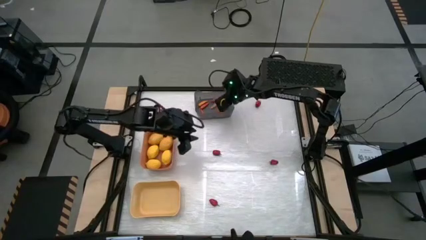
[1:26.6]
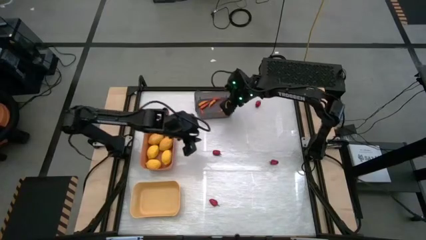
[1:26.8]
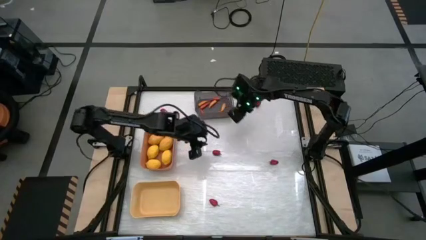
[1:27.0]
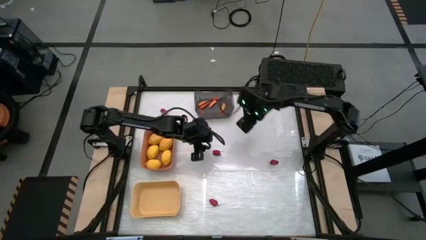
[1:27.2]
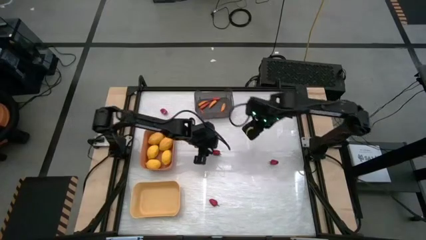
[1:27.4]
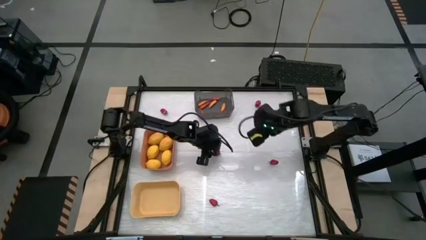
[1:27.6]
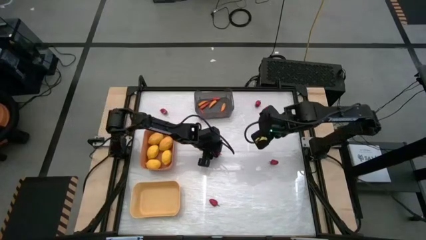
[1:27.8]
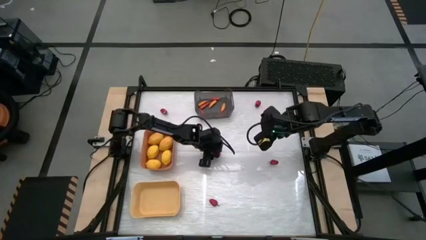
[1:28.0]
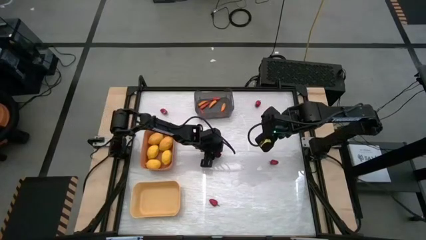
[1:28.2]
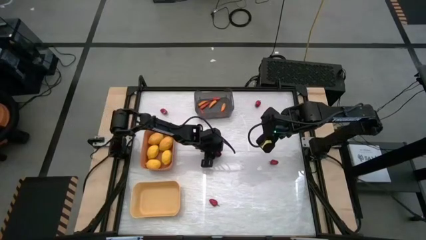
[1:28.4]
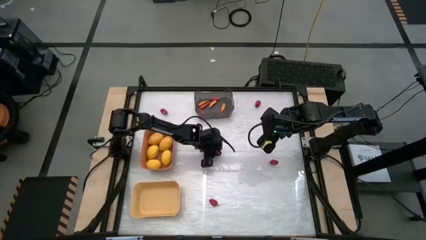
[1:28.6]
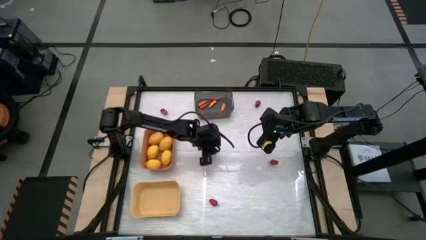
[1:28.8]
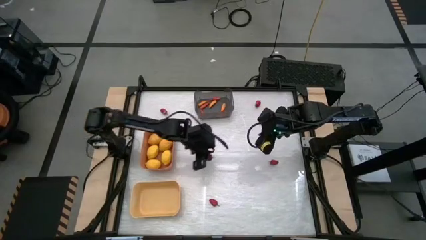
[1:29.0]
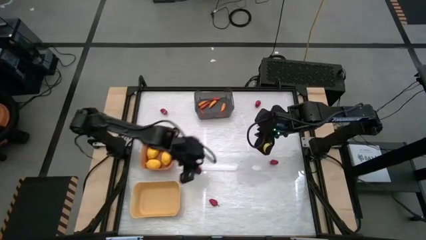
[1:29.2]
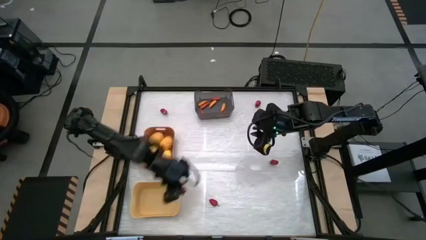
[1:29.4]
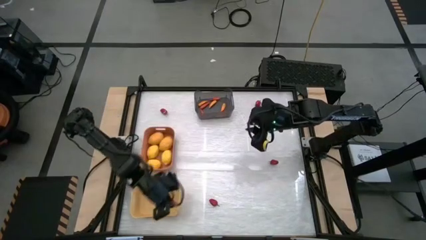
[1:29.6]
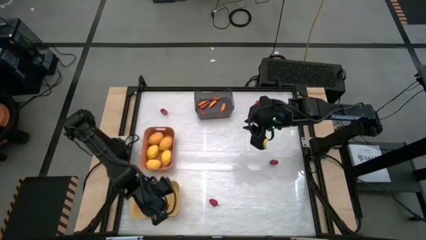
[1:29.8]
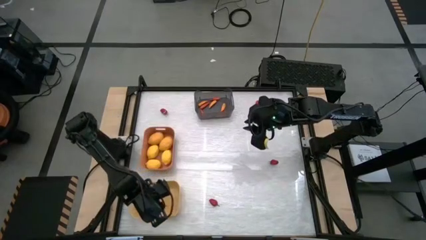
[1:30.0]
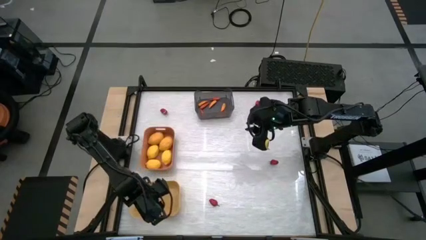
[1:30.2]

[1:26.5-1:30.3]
Task: Sort produce into baskets
Put the red bell pepper into the yellow bin

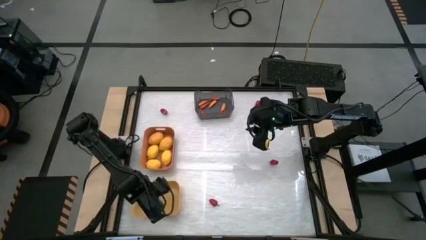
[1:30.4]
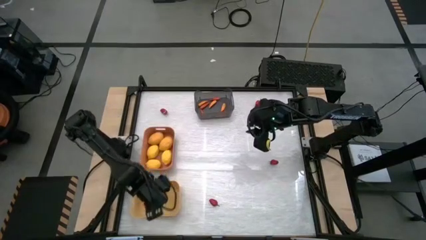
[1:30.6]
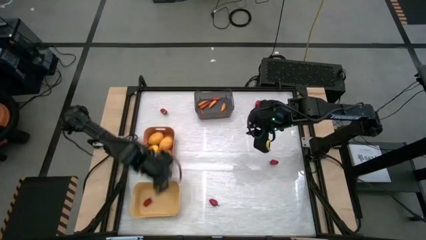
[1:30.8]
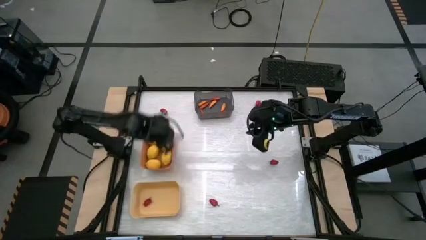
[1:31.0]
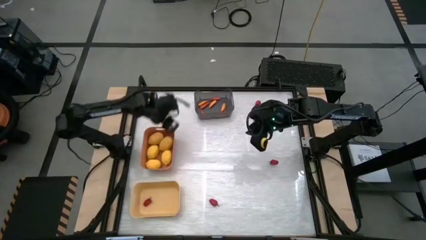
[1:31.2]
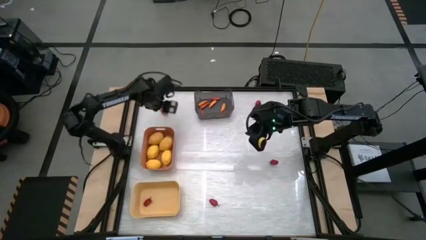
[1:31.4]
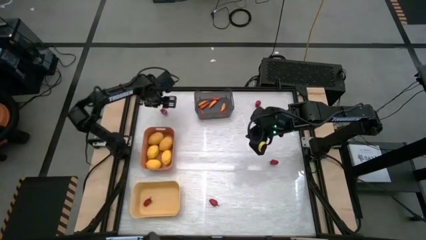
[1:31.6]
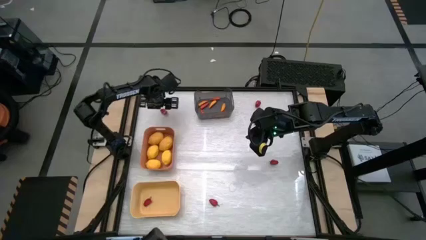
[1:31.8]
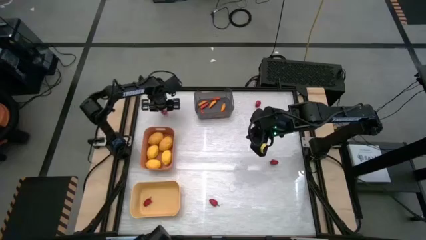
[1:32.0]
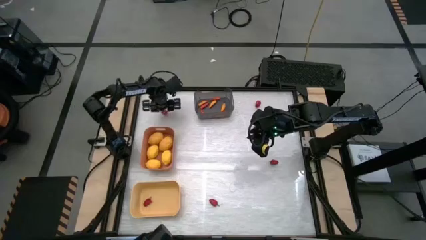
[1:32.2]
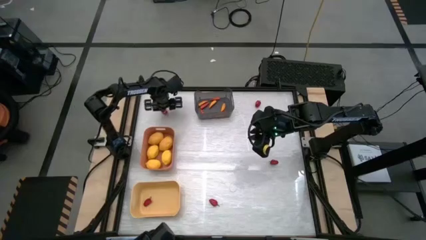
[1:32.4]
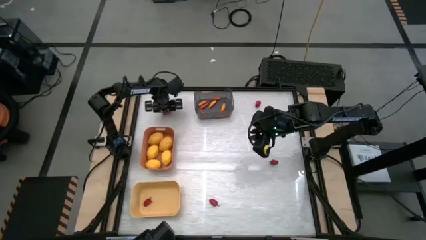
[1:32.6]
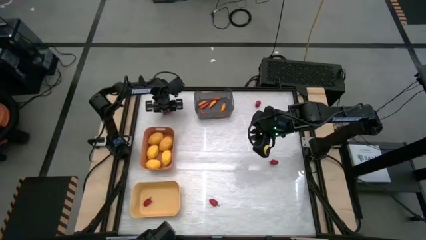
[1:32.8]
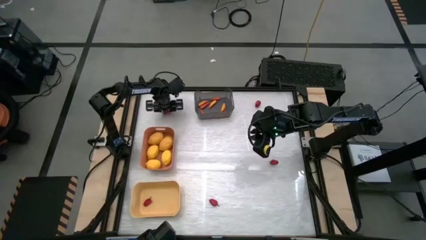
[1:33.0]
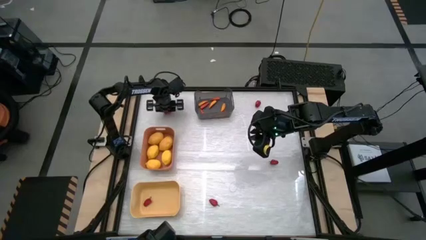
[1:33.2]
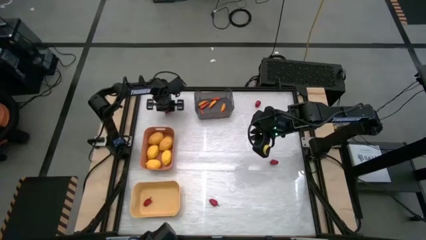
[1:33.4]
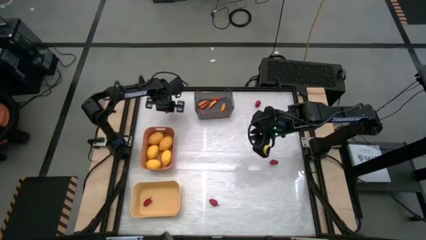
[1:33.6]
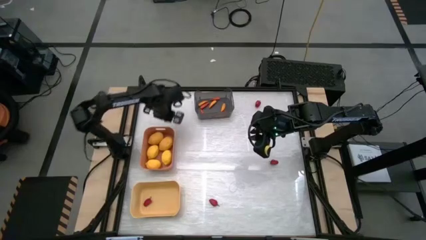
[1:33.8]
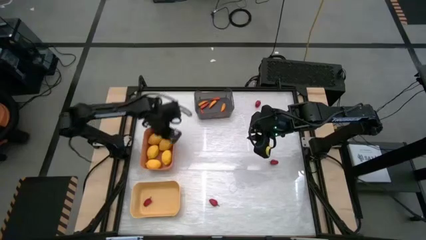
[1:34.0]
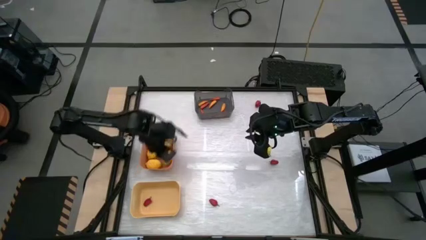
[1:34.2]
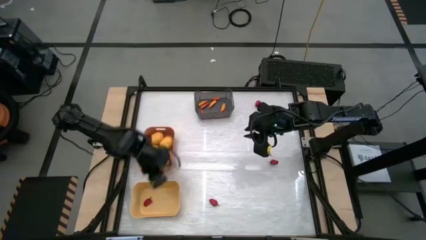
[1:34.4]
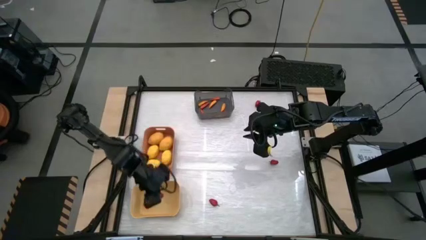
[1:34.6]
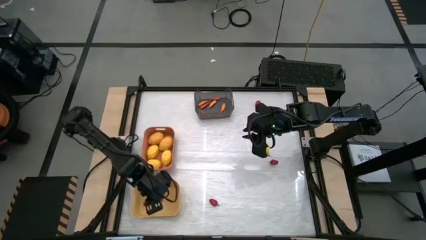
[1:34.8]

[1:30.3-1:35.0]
Put the red bell pepper into the yellow bin

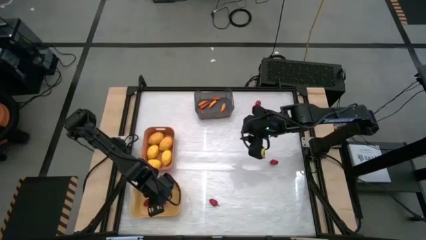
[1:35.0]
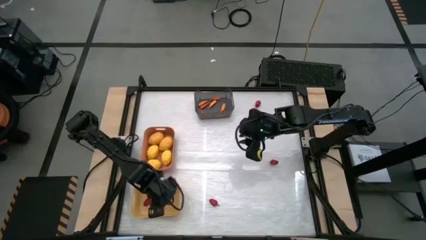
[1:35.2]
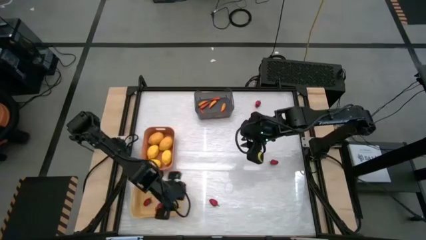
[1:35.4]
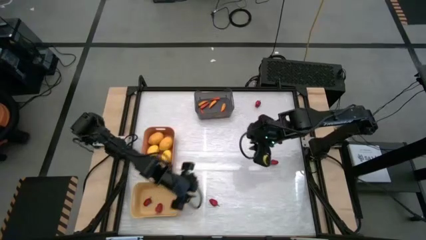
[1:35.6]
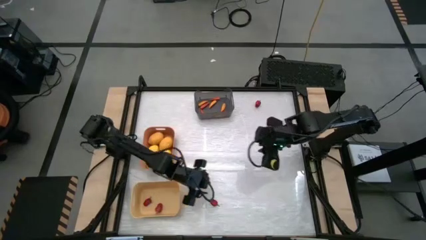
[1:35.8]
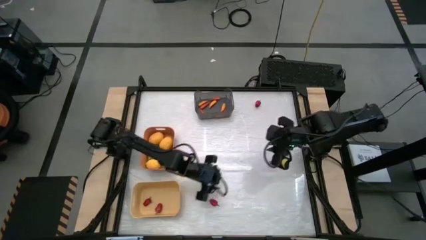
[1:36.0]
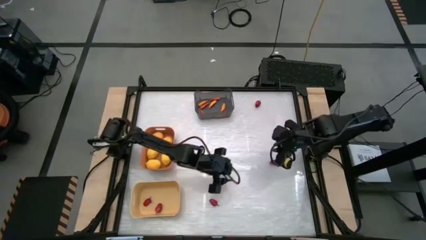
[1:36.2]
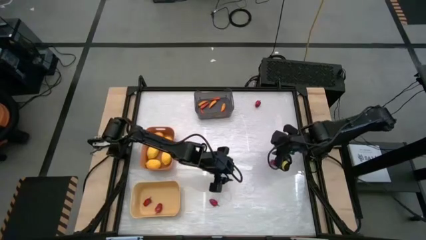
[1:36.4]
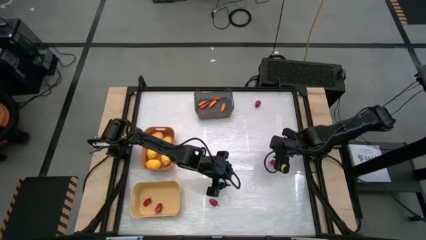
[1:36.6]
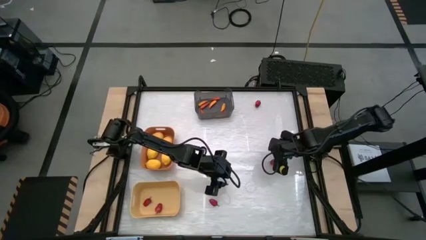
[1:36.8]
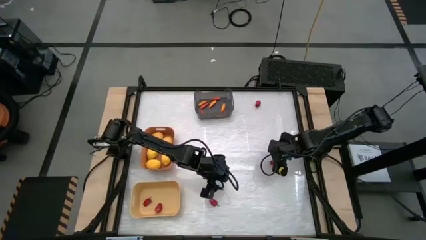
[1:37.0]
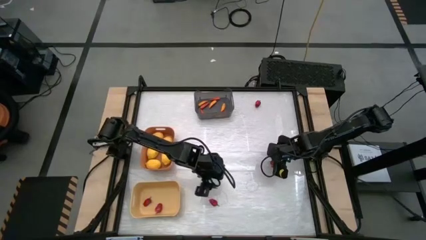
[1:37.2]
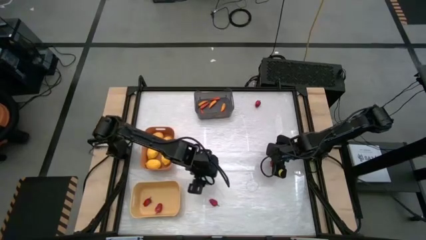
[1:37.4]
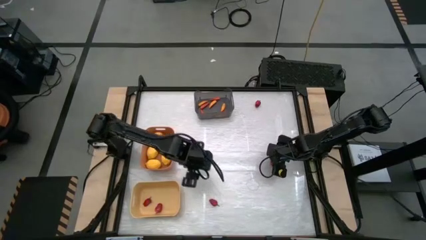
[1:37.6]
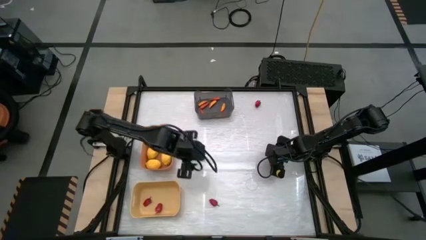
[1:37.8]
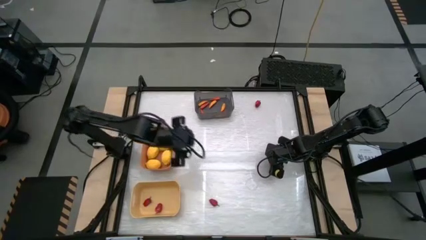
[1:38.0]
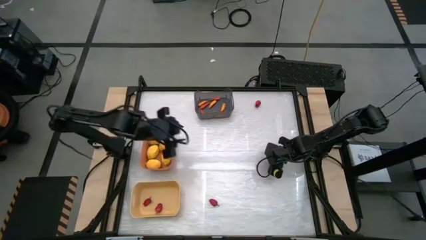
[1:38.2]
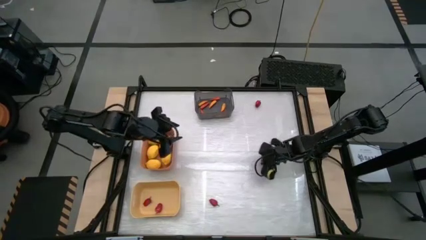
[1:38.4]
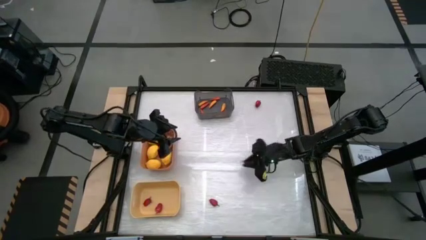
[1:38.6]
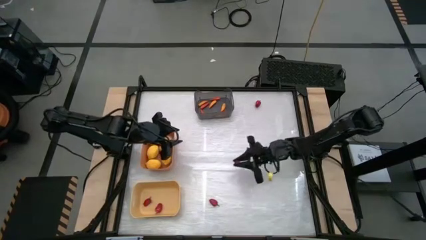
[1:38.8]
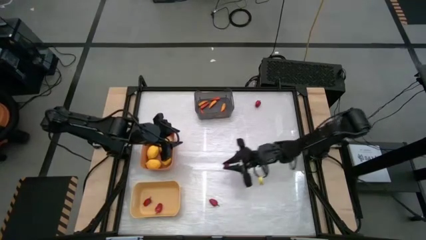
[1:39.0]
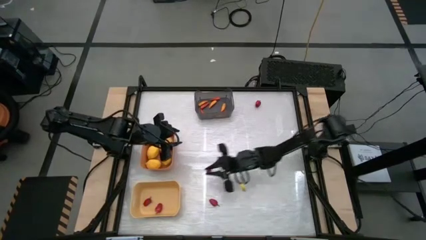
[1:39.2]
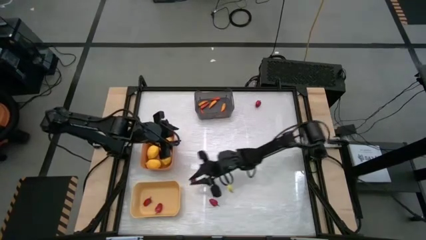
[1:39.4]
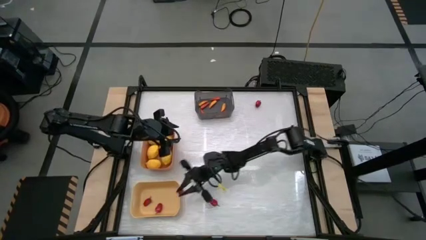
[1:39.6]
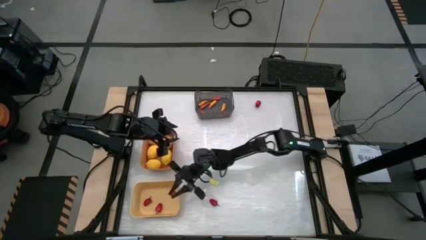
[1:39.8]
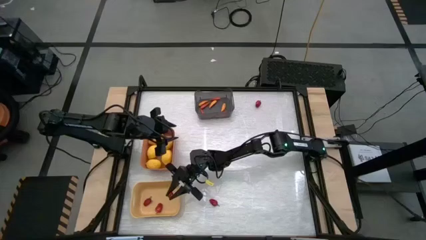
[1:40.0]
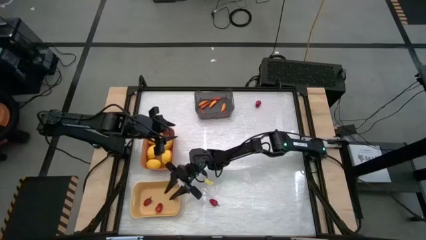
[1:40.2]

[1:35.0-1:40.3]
Put the red bell pepper into the yellow bin

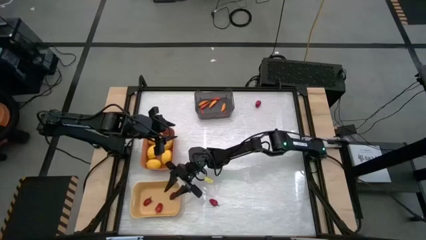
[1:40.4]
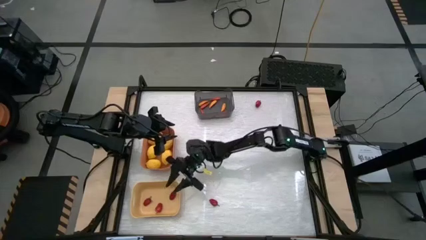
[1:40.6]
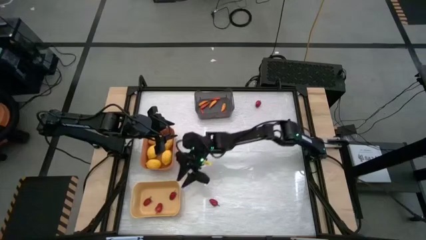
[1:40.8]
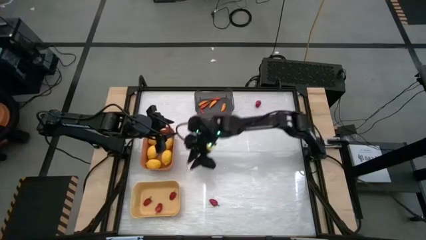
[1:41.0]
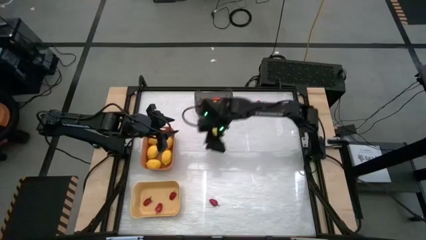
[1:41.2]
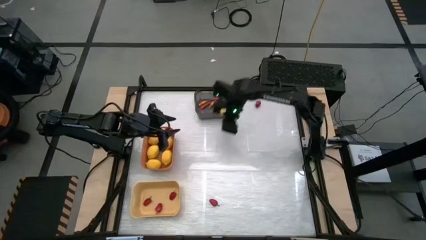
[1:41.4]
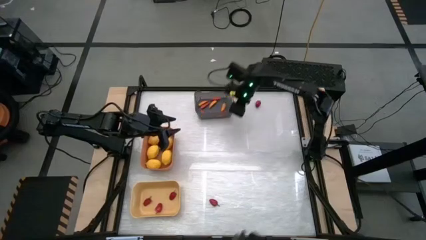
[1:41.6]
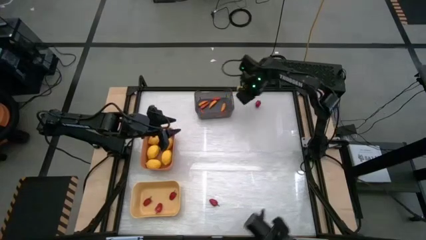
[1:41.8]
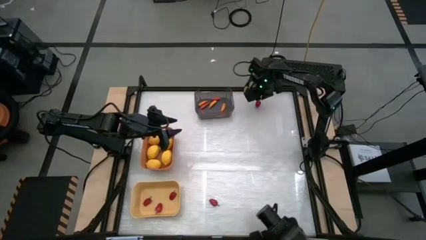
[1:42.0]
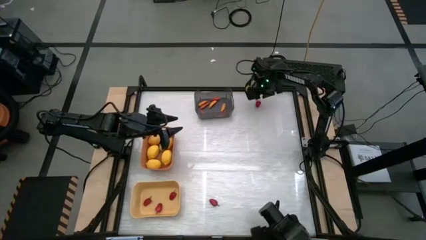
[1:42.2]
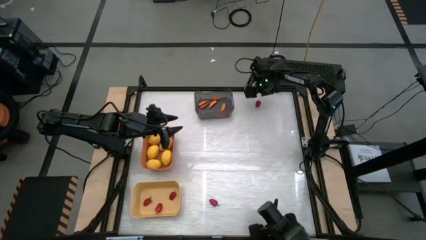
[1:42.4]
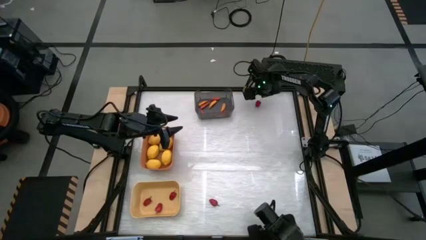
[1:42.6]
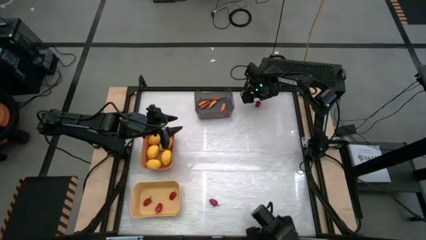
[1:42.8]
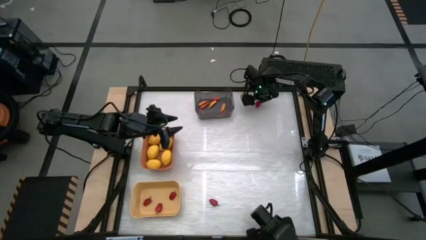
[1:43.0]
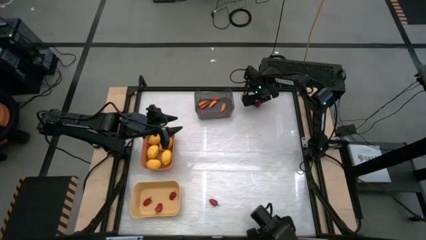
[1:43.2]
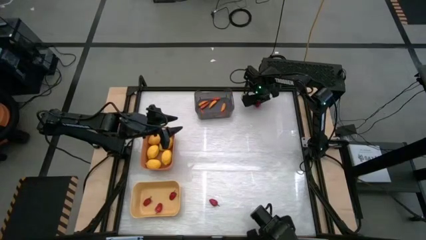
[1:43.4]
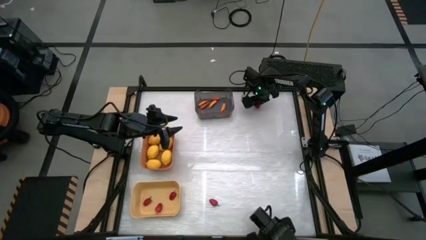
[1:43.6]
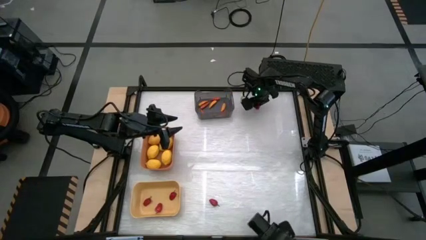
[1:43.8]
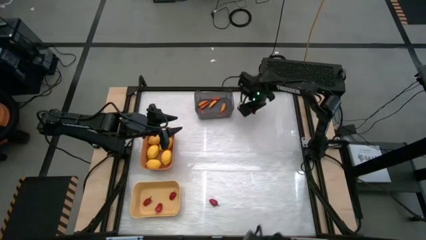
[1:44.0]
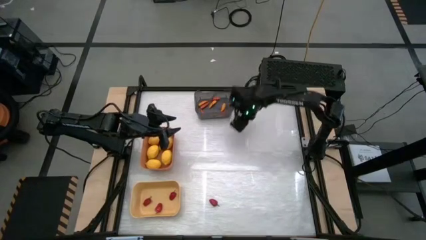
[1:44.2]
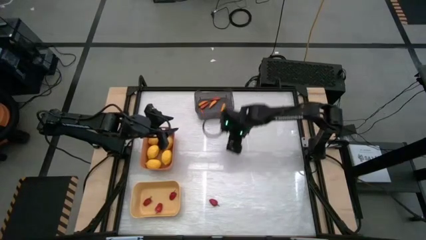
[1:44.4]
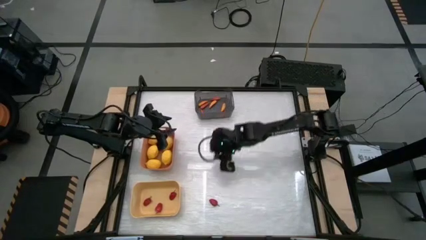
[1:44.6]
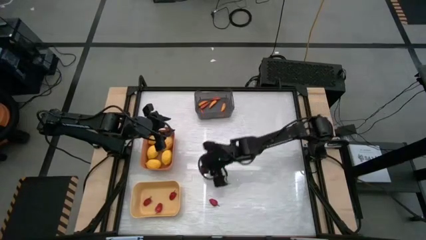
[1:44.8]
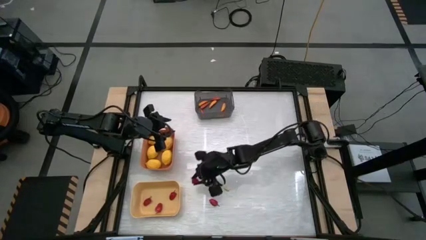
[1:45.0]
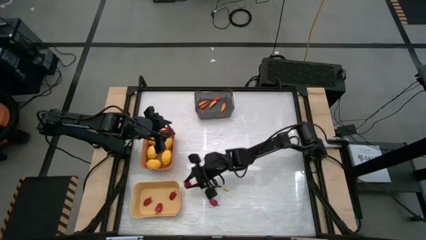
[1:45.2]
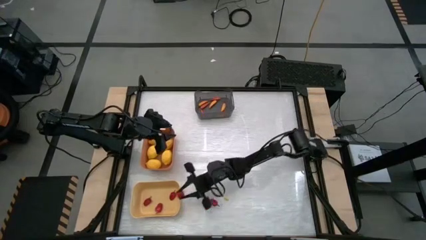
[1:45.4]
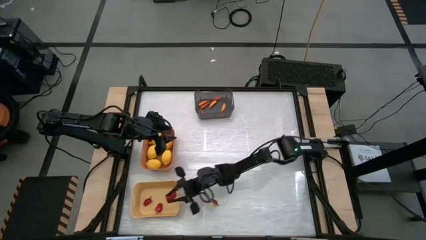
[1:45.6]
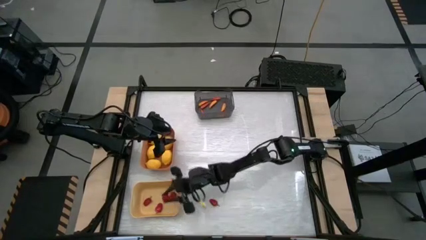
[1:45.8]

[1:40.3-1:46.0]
Put the red bell pepper into the yellow bin
